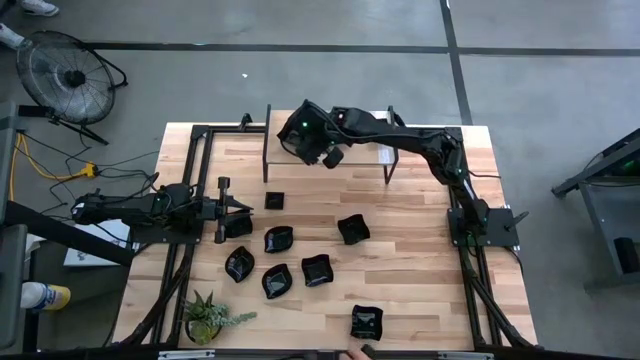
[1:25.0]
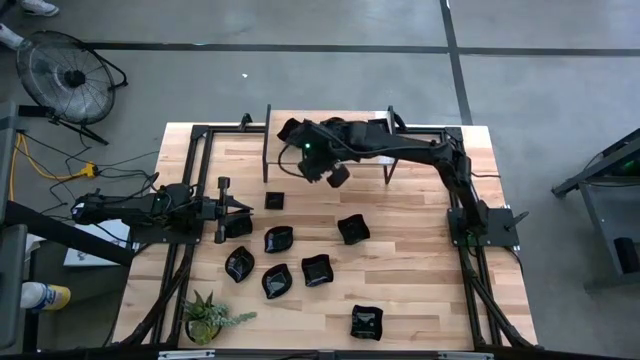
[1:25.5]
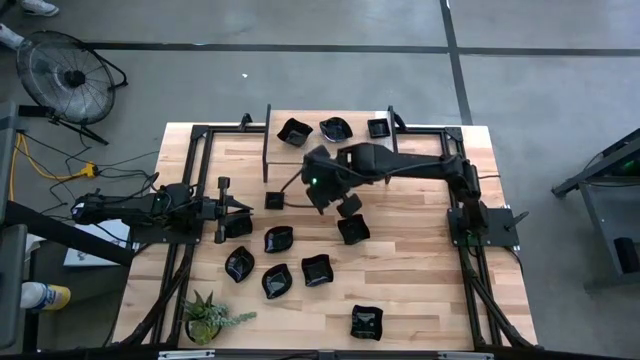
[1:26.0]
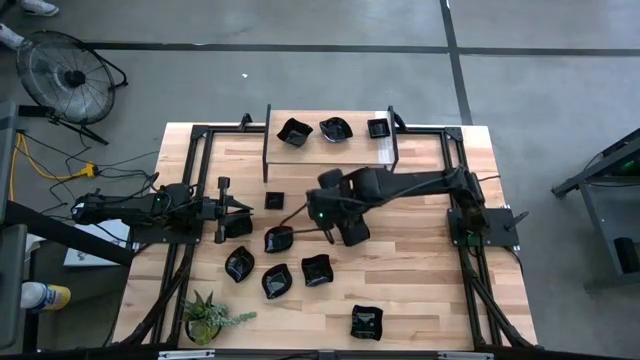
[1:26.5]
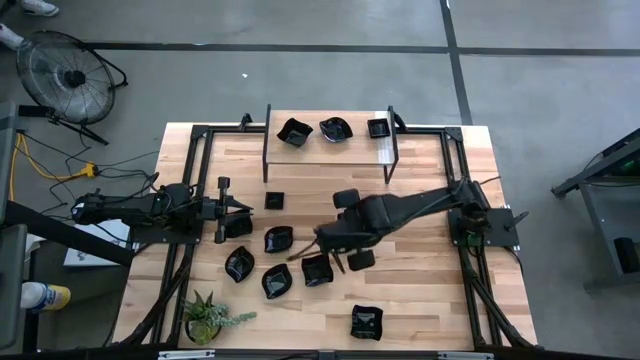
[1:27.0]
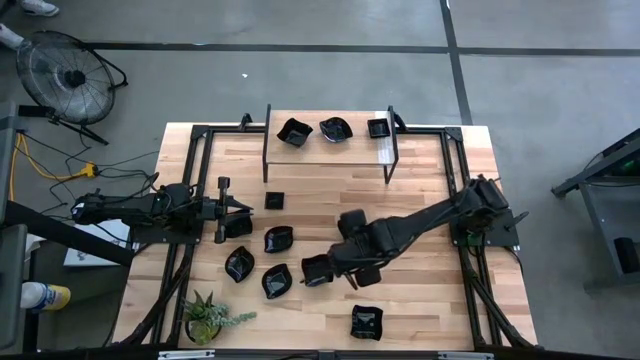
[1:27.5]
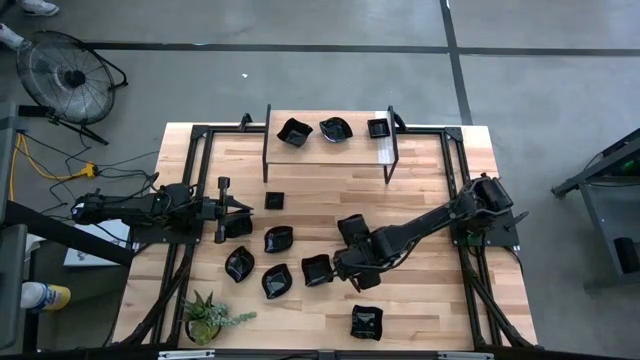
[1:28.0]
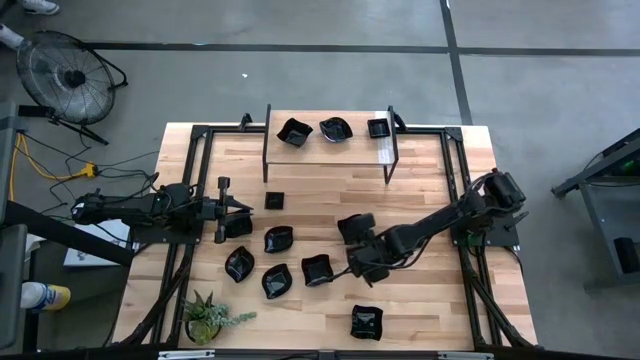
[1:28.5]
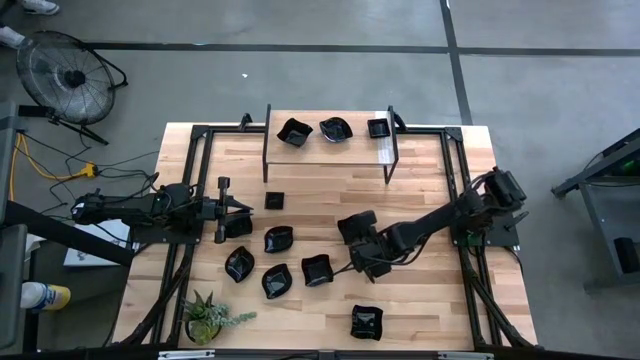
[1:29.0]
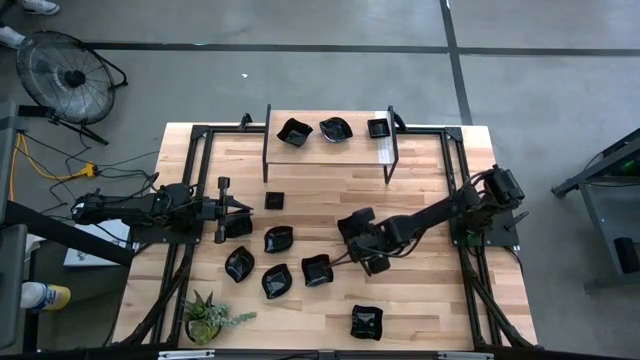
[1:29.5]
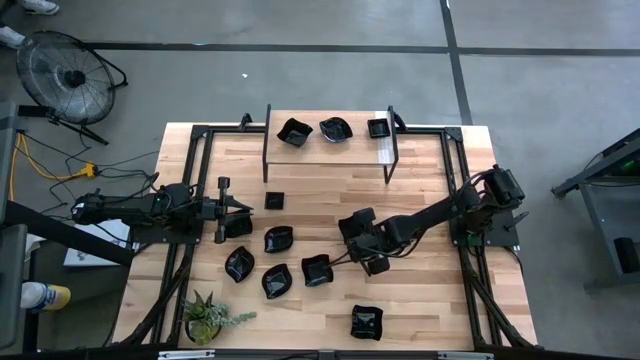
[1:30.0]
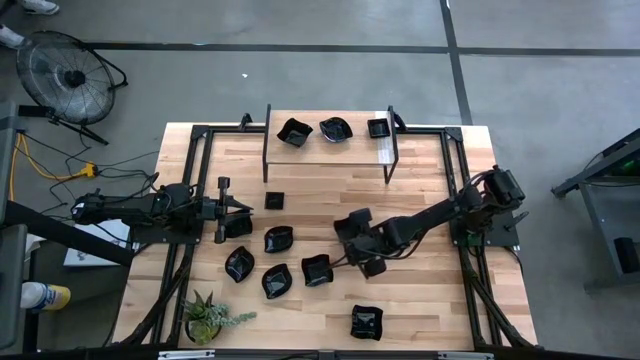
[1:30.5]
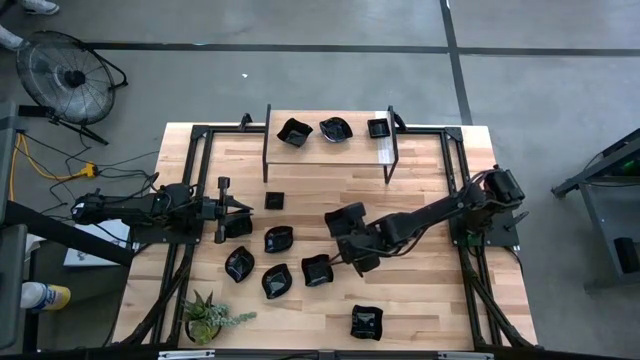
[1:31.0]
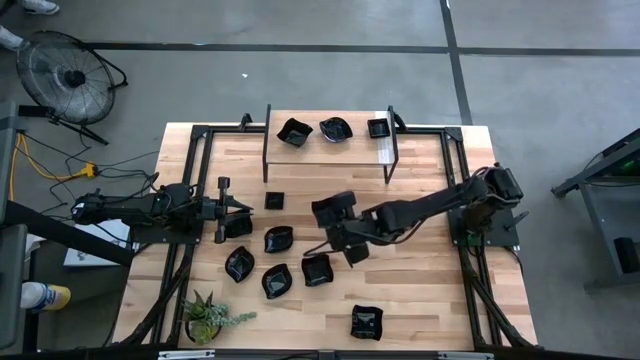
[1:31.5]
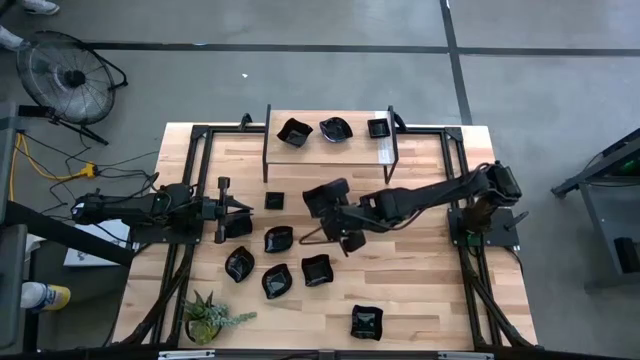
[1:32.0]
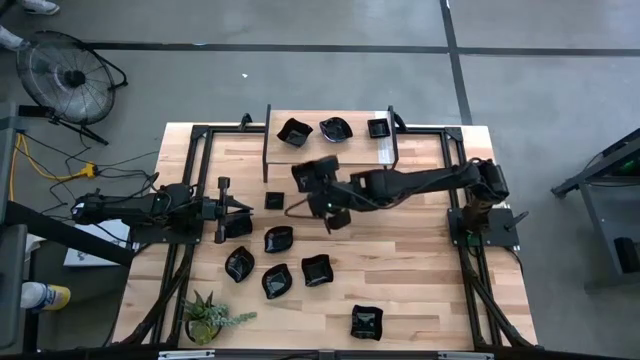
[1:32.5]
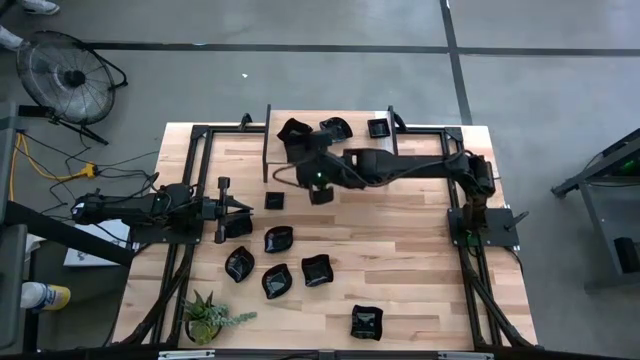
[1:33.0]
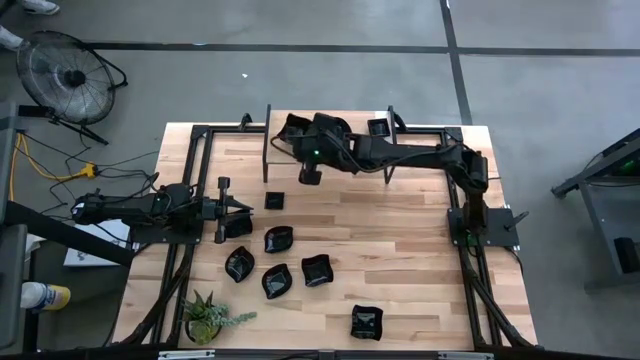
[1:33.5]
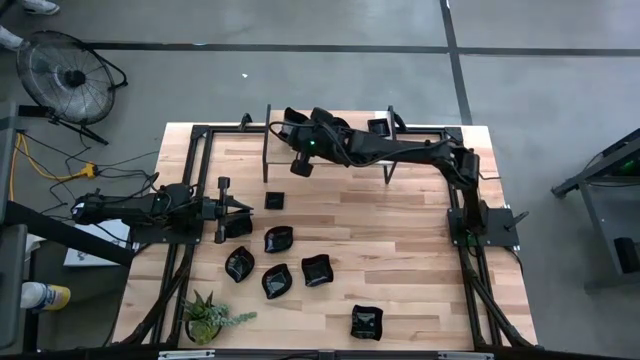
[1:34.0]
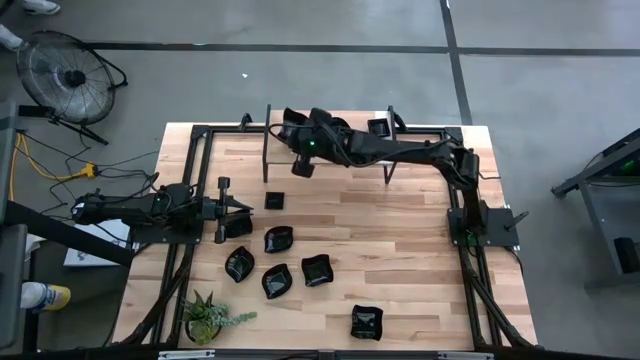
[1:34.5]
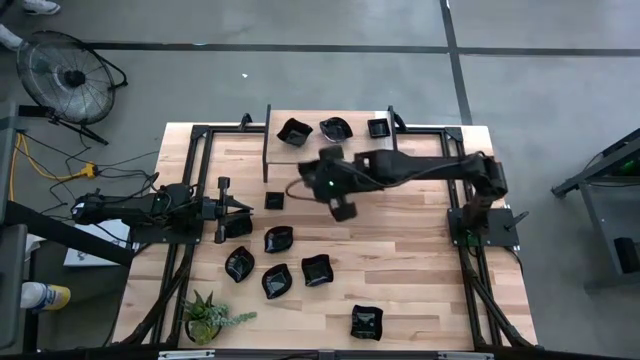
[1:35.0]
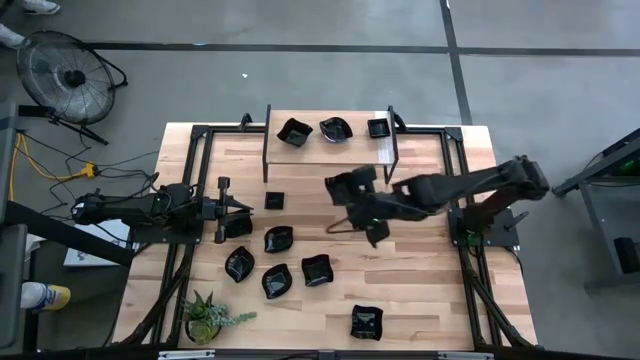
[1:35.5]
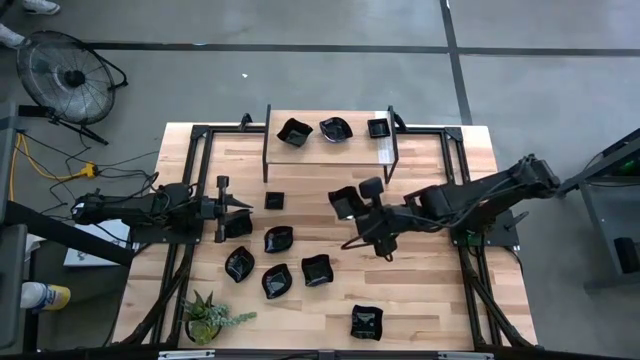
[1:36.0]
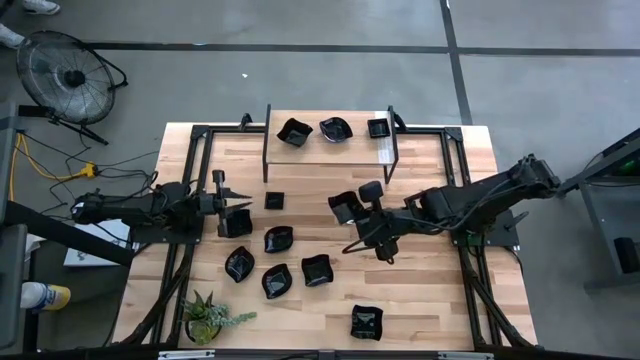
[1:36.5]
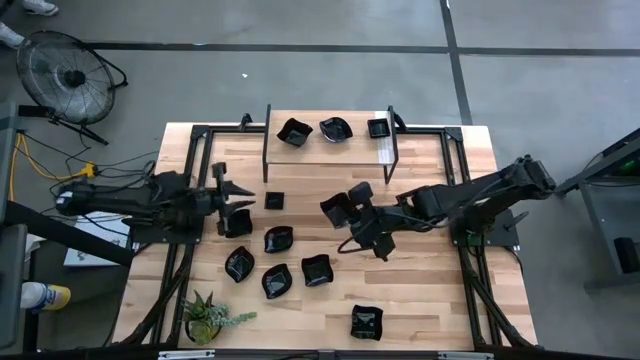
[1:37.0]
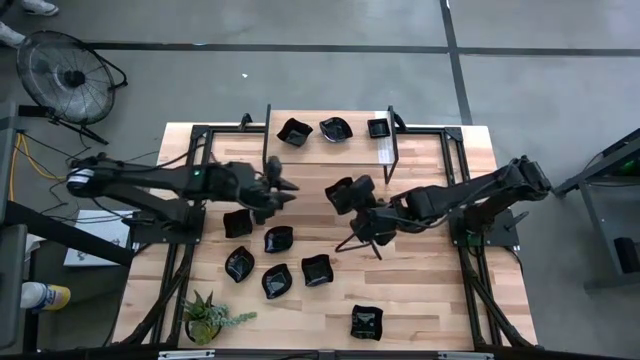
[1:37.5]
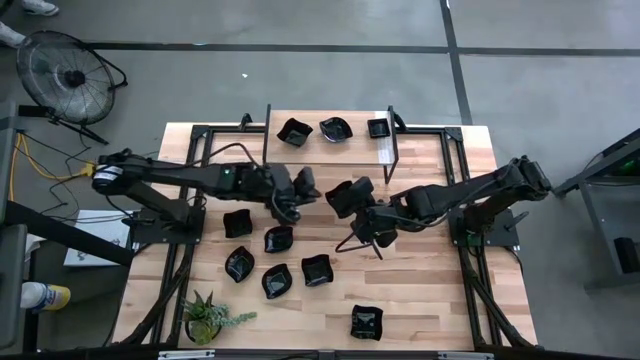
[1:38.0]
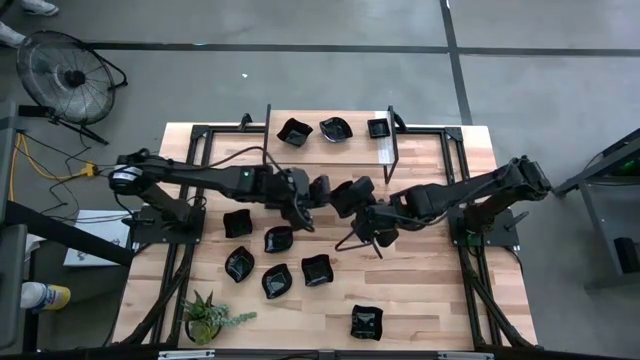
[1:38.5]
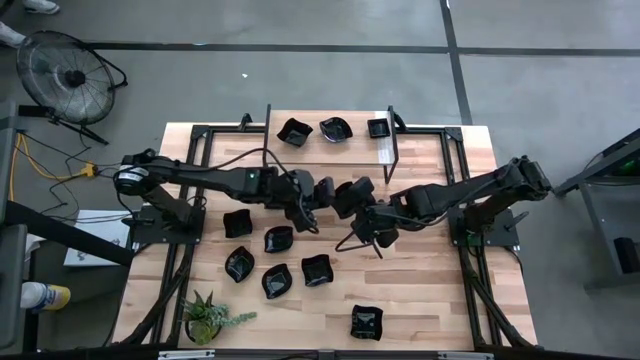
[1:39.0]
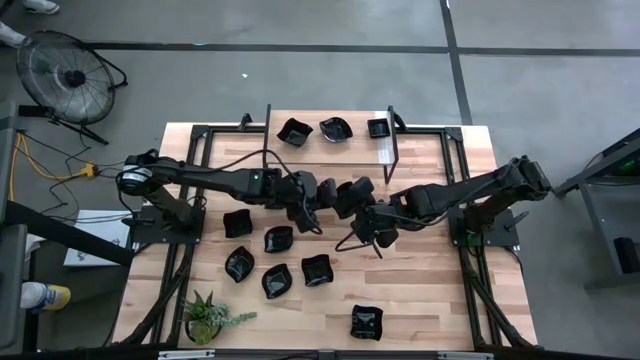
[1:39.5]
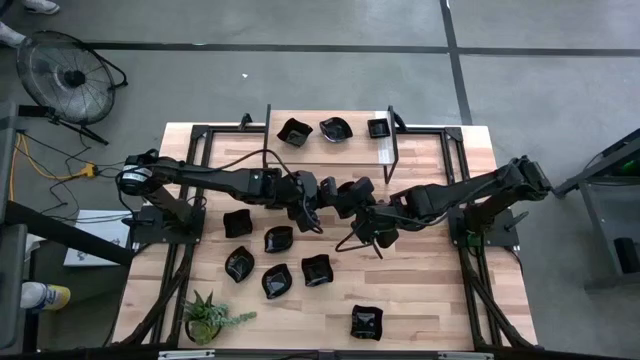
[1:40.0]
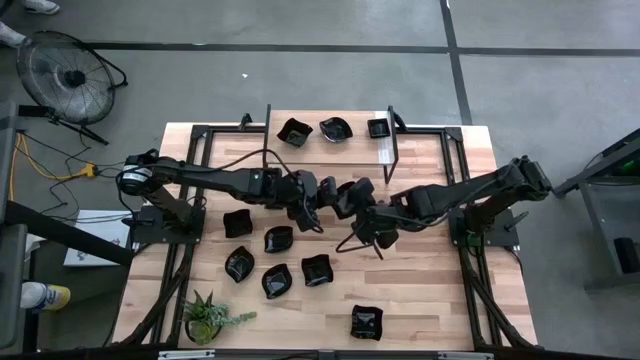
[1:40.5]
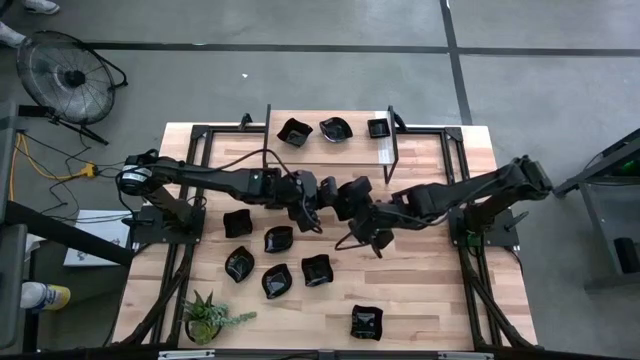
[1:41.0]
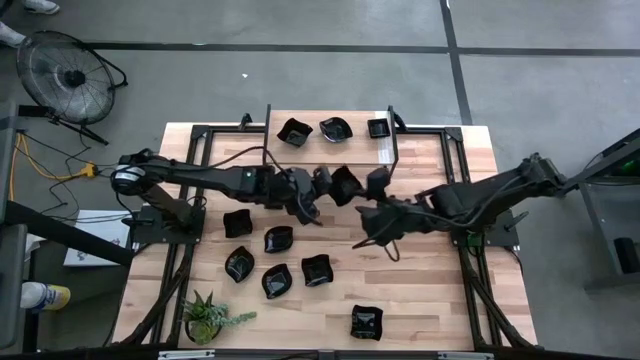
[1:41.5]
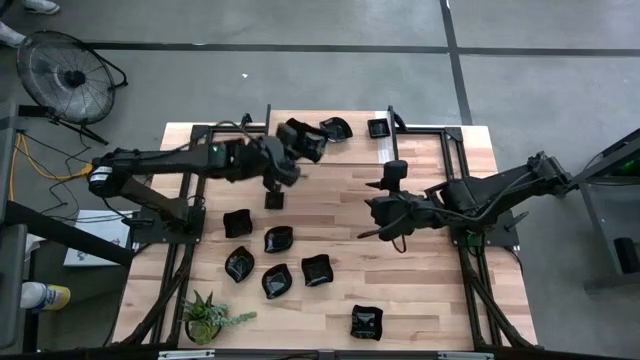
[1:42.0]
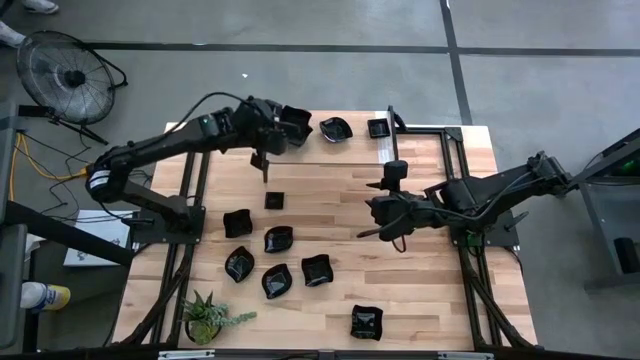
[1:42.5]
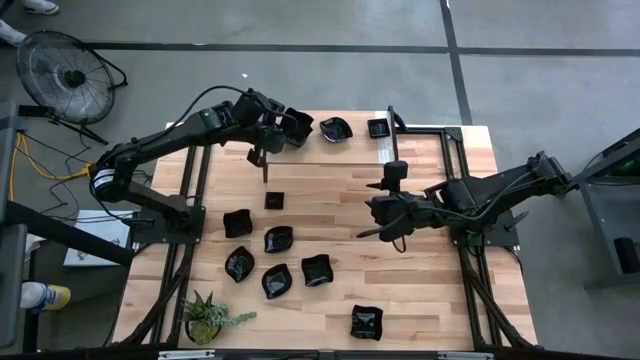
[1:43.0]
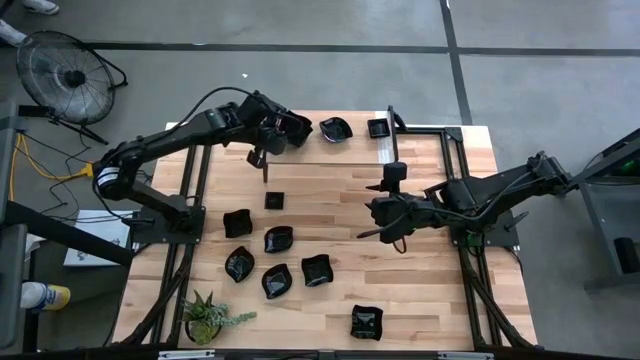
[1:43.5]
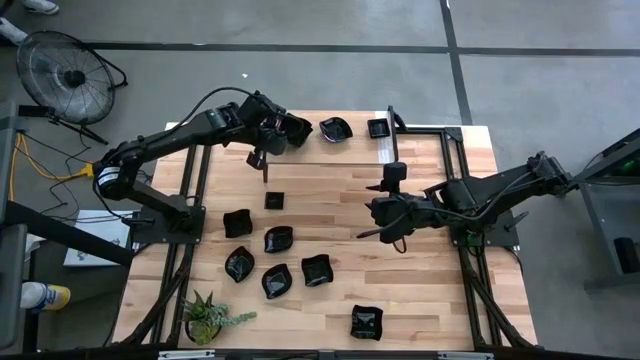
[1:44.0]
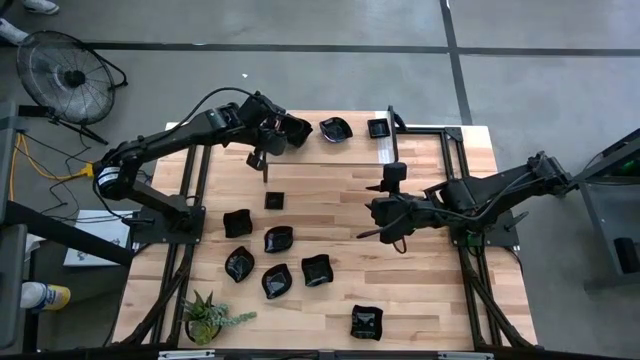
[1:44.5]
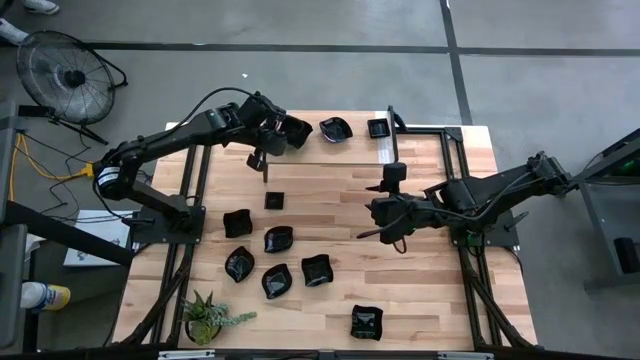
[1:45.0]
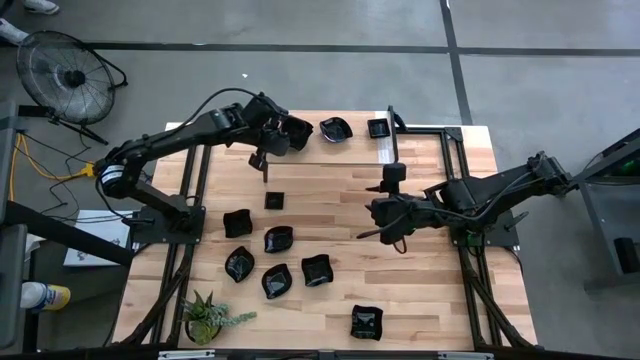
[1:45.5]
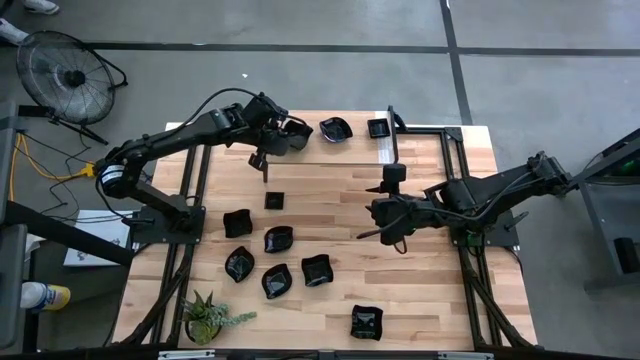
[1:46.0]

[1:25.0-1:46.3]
Task: Pick & Place Mini shaped plates
Stack the black distorted square plate on top of the black distorted square plate on the shelf
